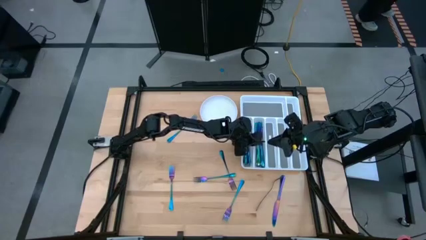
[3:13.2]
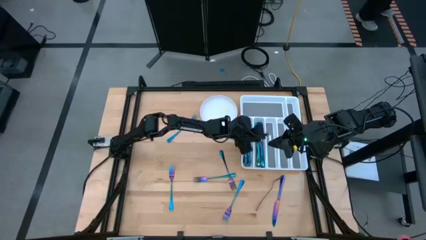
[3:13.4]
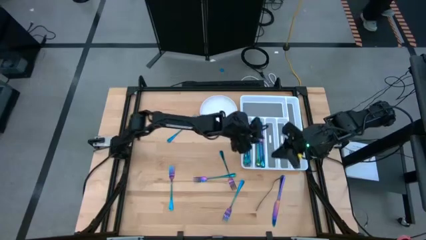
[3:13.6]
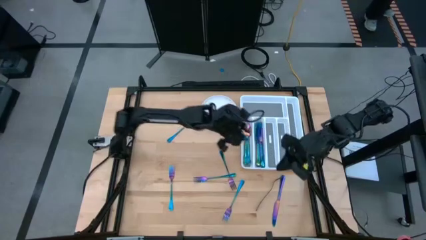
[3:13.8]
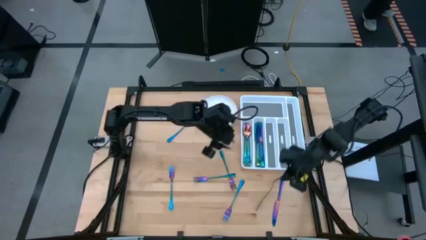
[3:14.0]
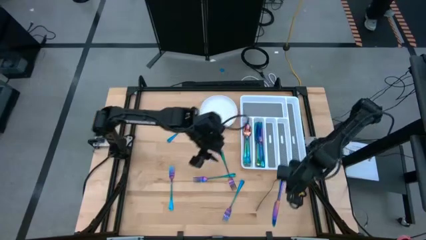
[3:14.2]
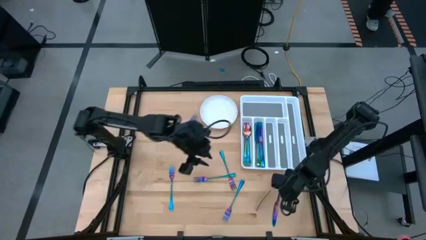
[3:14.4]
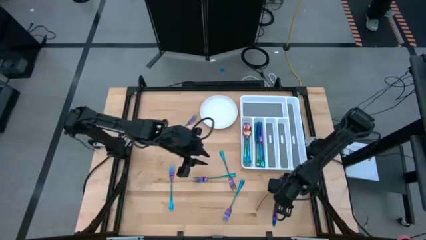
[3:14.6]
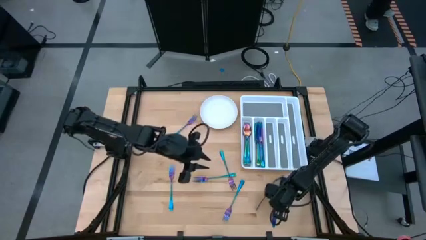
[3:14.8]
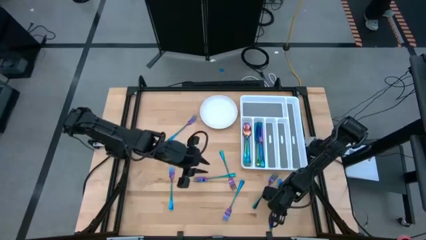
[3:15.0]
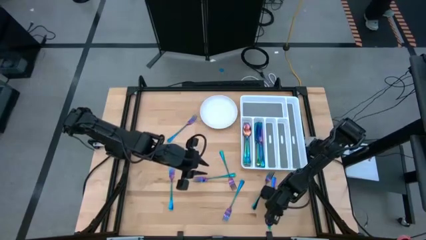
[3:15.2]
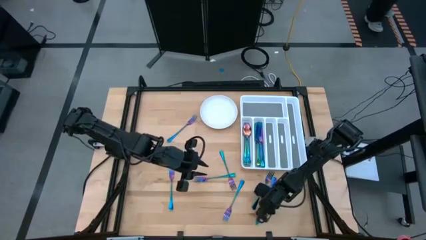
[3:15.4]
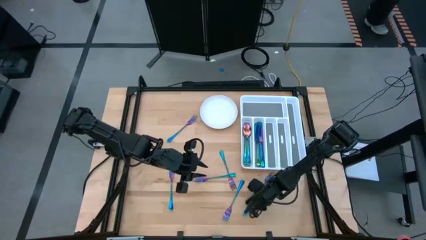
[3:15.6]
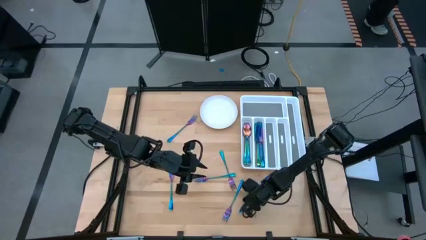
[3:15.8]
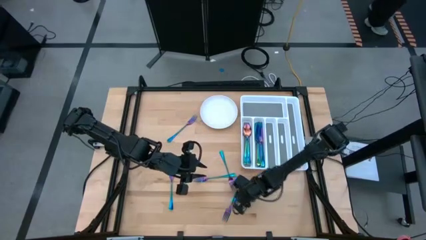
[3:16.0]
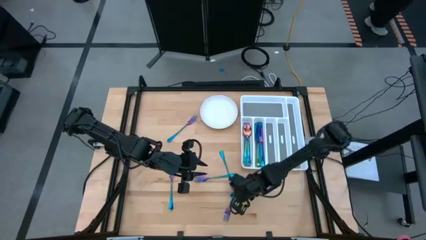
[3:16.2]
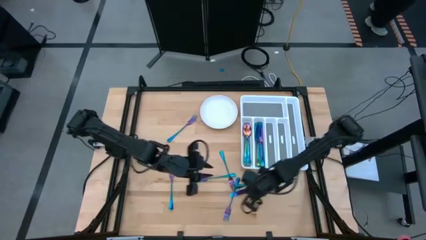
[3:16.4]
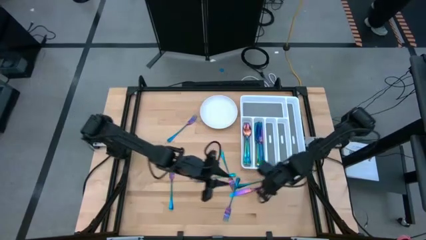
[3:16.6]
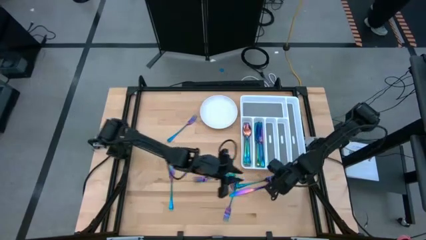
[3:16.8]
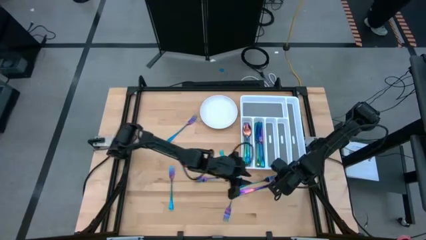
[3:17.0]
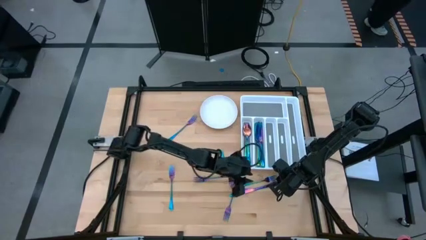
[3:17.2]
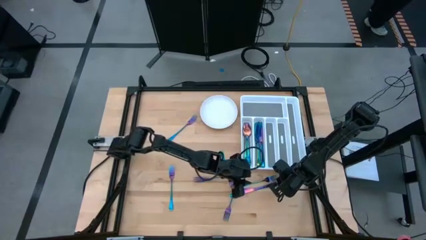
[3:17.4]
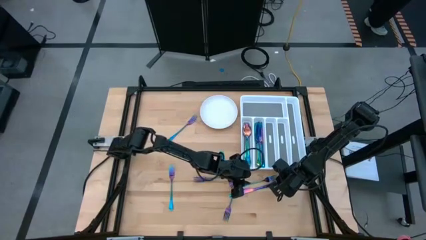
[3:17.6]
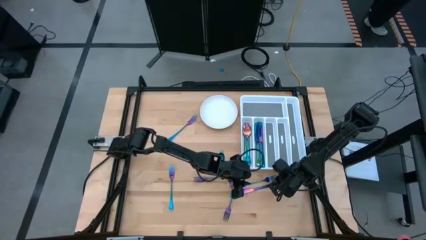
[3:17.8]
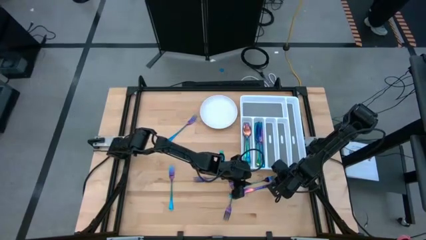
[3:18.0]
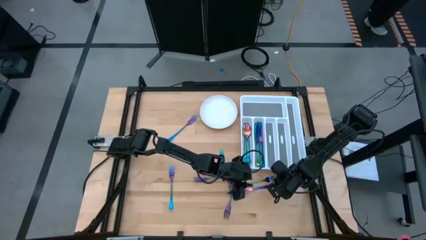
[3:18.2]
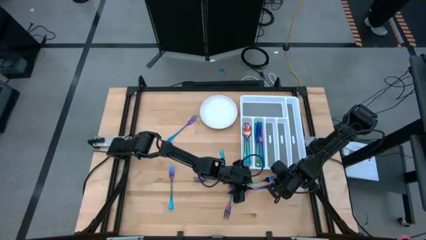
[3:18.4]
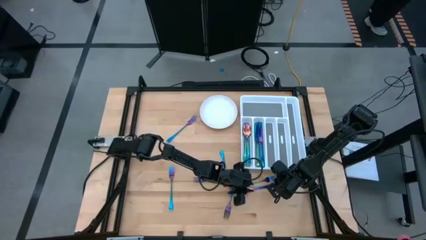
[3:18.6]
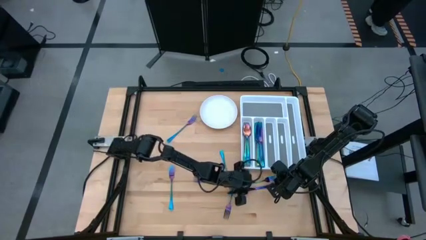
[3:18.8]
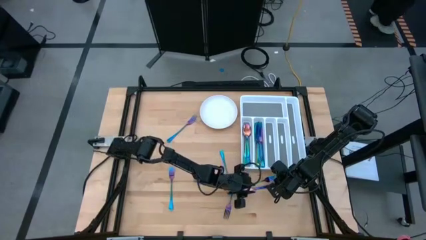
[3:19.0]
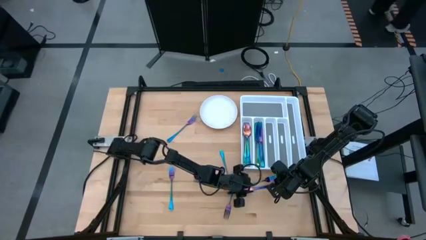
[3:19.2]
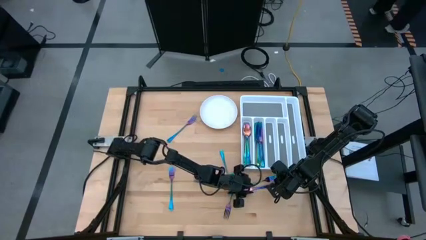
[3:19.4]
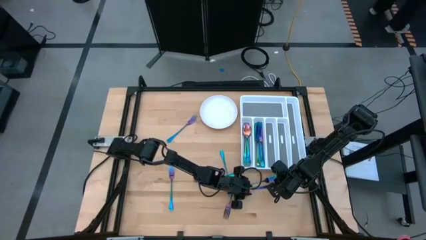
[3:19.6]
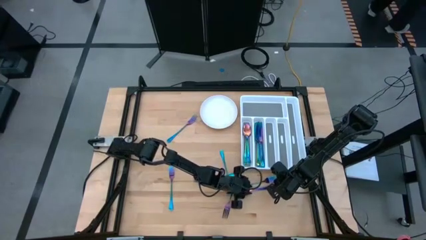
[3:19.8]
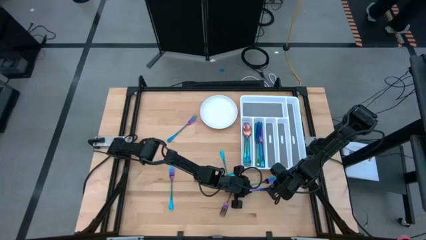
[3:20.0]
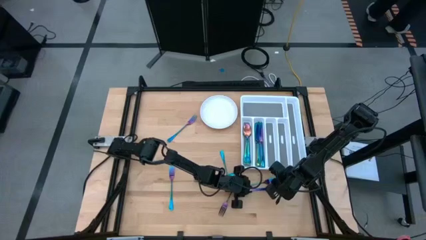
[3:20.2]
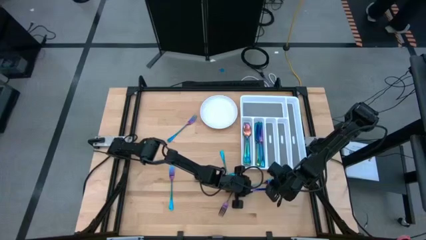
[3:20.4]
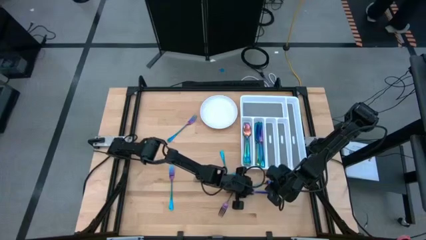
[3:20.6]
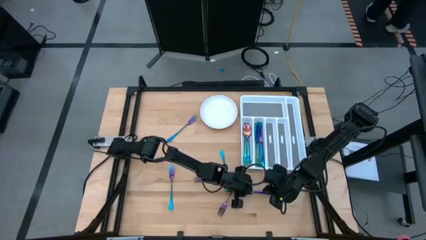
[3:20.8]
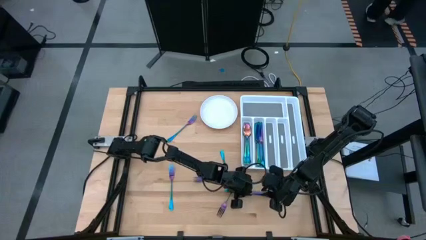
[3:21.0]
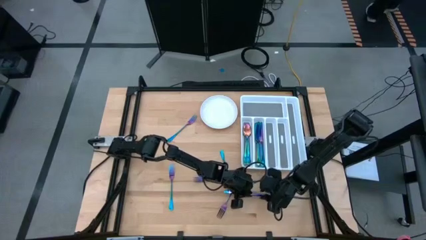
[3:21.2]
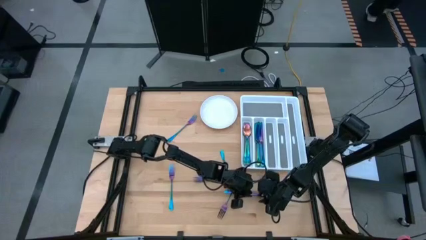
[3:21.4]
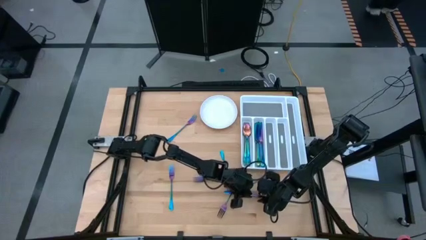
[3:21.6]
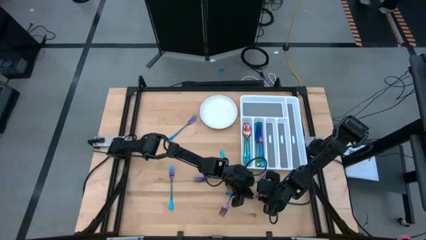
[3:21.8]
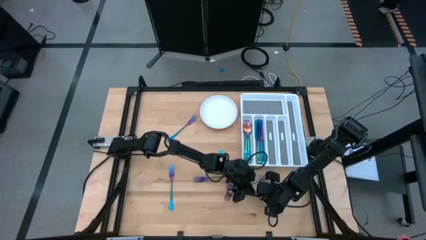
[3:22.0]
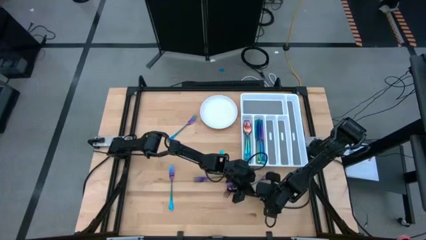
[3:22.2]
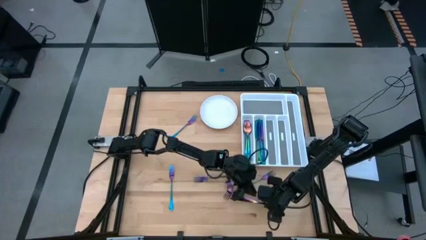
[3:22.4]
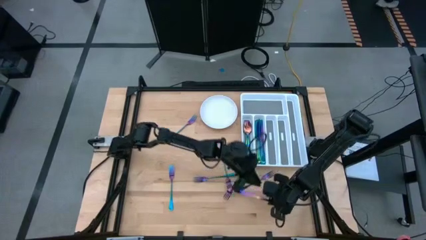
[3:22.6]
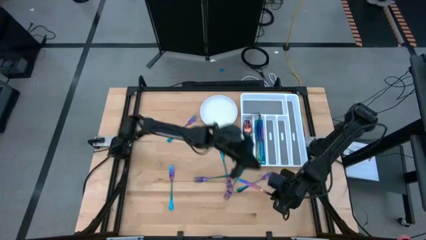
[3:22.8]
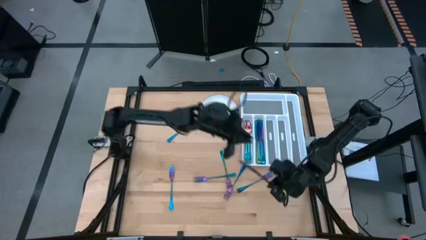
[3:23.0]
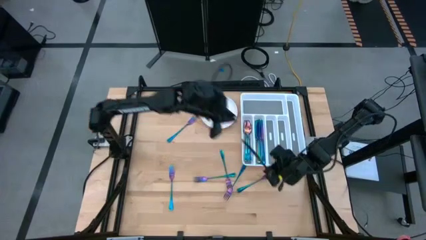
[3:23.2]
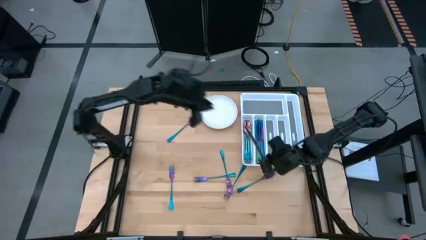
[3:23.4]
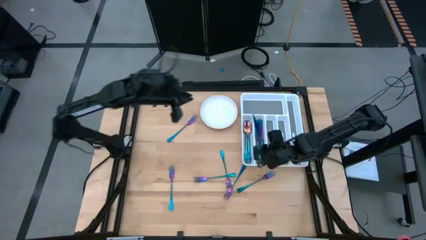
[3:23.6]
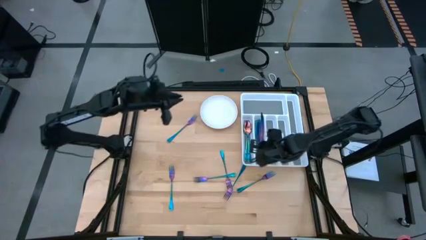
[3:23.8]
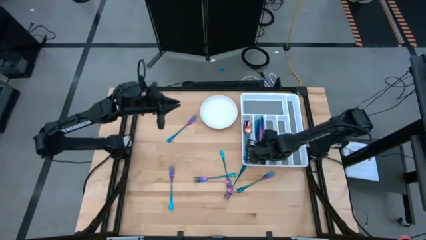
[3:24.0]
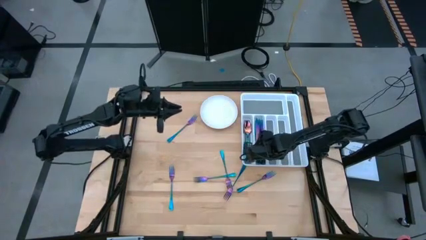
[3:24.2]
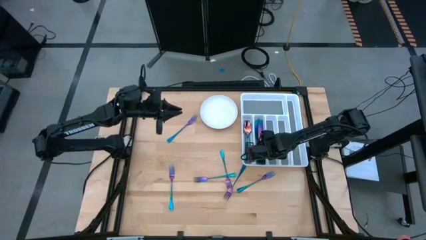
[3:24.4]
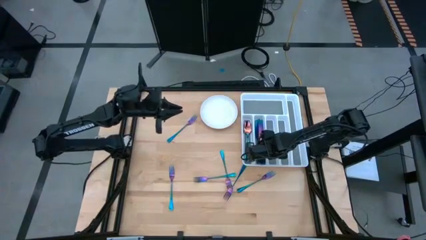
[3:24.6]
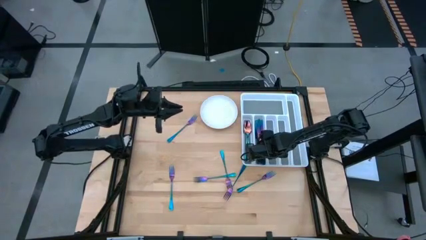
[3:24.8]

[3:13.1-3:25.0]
Task: Sort silverware
Put the purple table knife into the white silverware tray

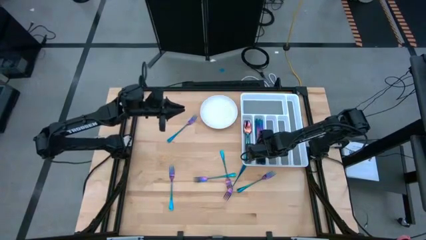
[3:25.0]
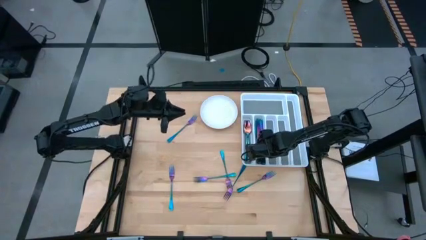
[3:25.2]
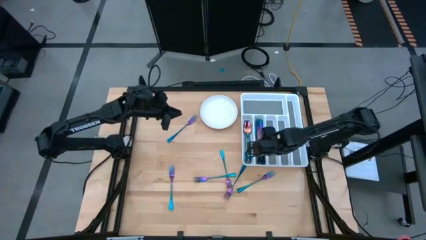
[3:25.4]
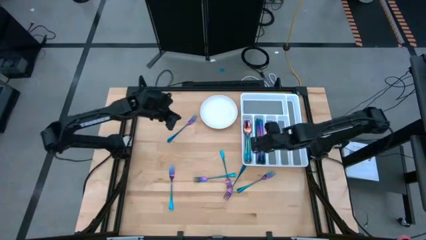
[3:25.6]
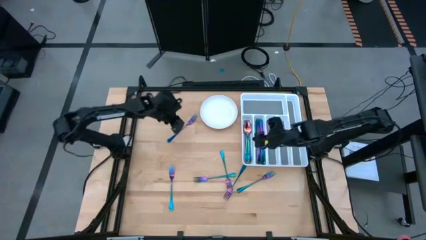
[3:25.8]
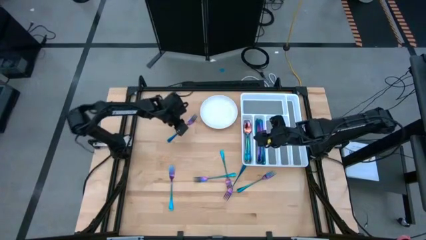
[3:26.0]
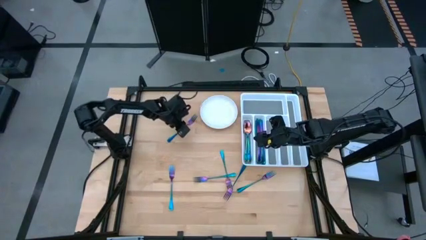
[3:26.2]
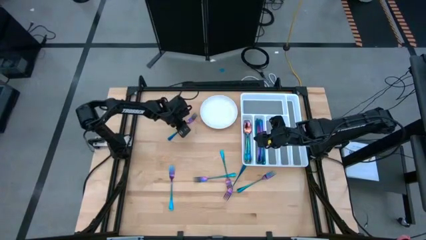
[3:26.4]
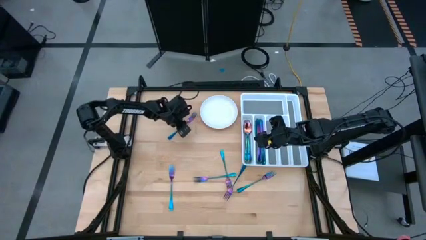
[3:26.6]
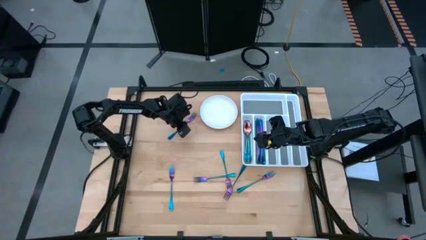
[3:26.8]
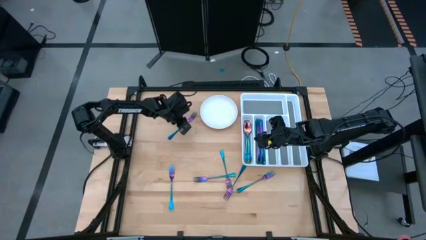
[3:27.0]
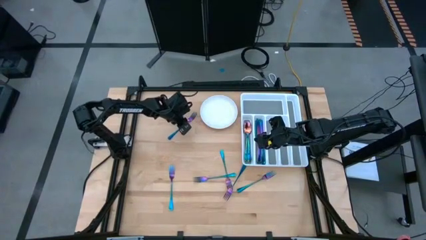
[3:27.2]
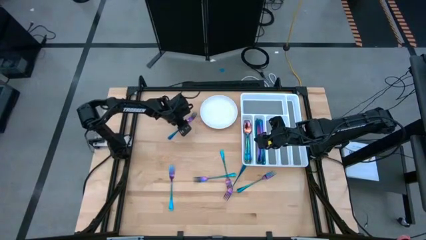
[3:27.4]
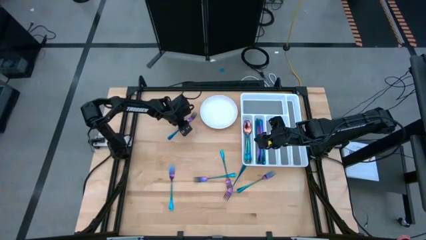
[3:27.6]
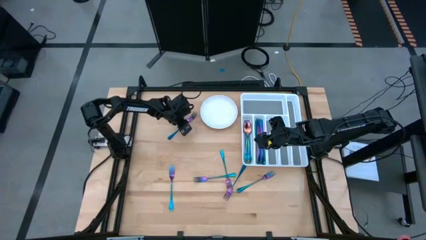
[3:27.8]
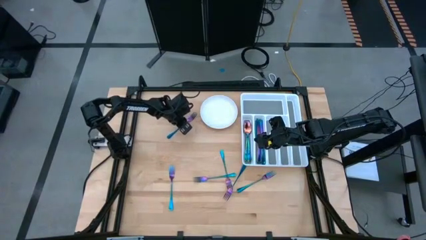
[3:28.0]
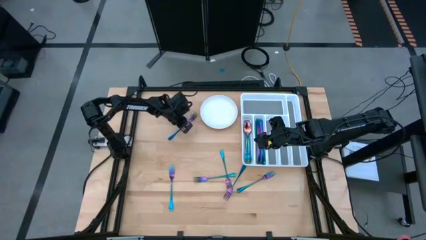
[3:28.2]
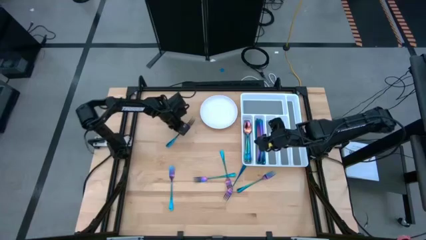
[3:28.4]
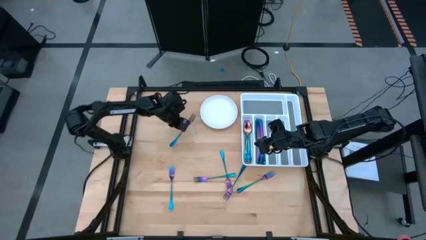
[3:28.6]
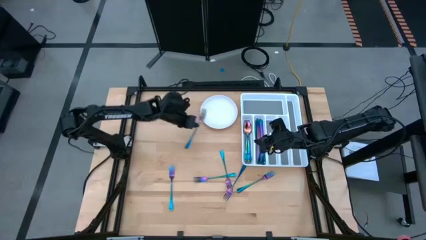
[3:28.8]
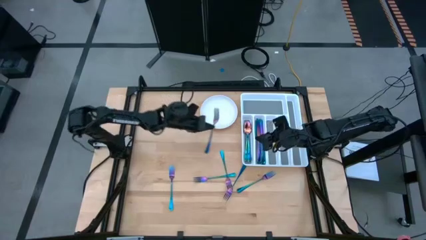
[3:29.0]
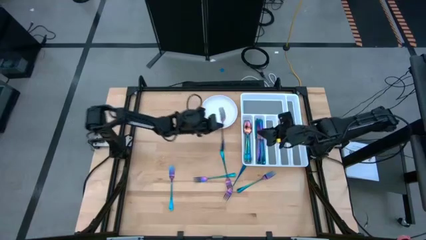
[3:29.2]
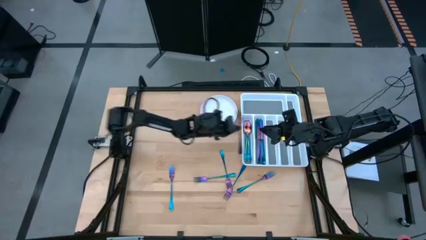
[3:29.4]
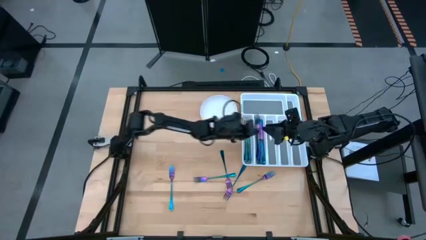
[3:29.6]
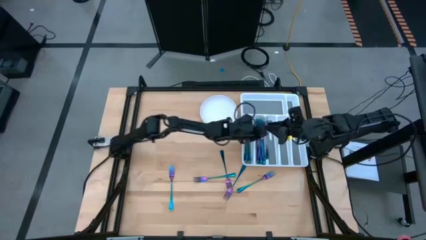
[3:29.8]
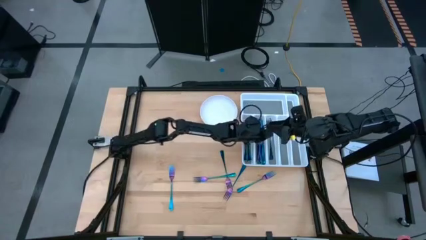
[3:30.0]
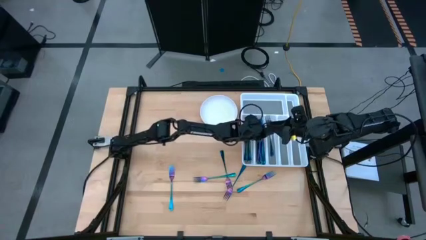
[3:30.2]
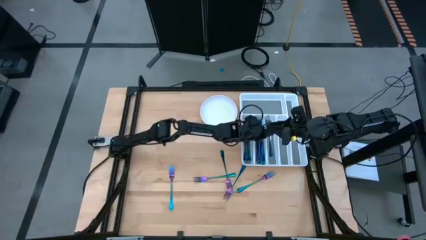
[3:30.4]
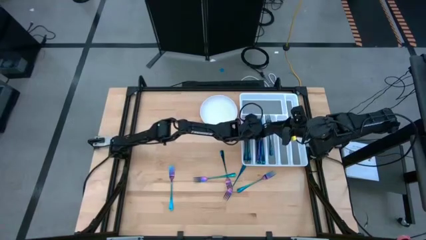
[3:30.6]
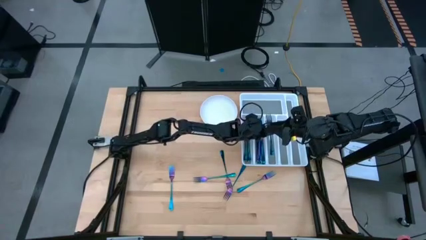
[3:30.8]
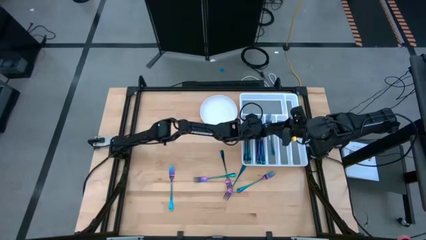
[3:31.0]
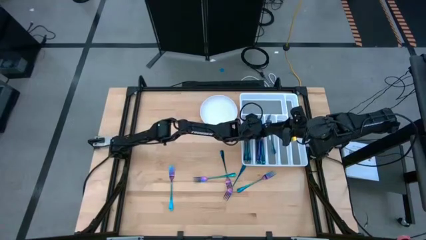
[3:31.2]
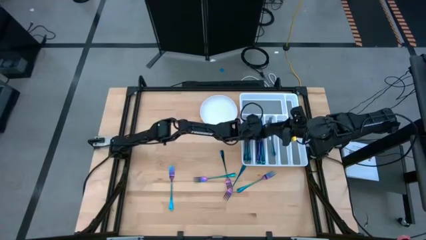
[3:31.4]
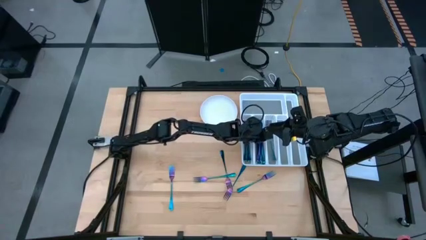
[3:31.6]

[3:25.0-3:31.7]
Put the purple fork into the white silverware tray
